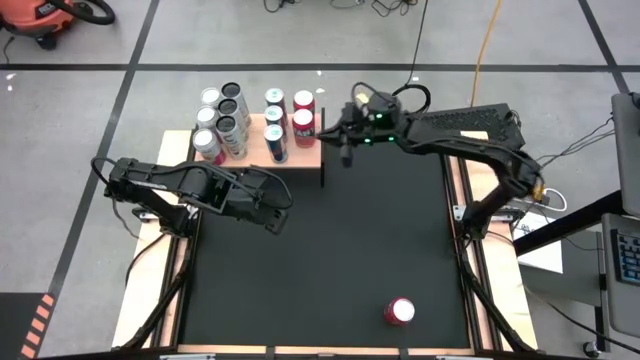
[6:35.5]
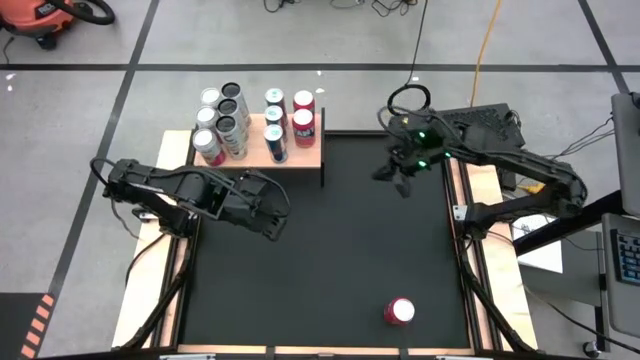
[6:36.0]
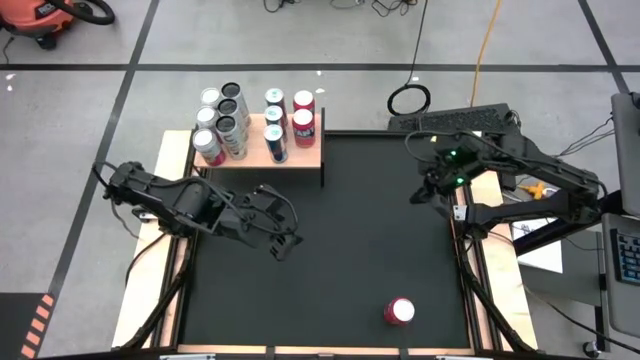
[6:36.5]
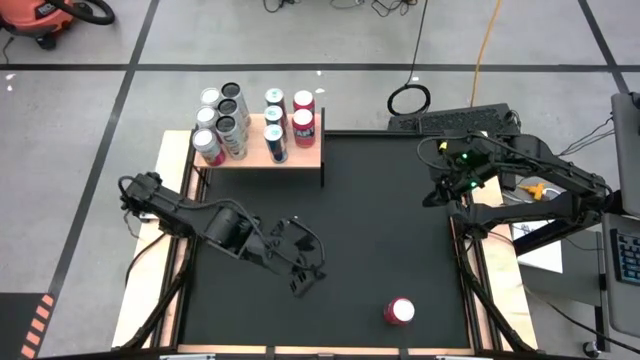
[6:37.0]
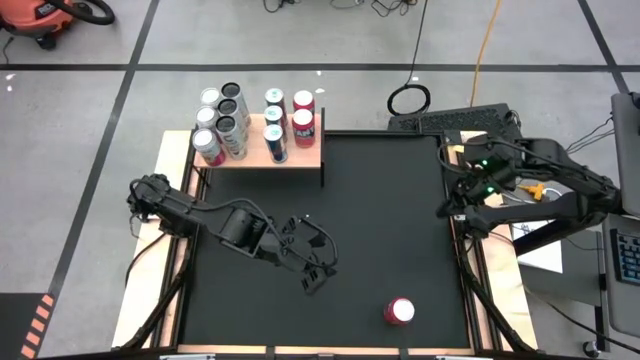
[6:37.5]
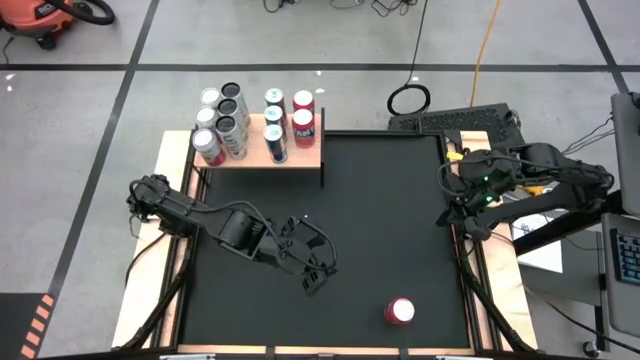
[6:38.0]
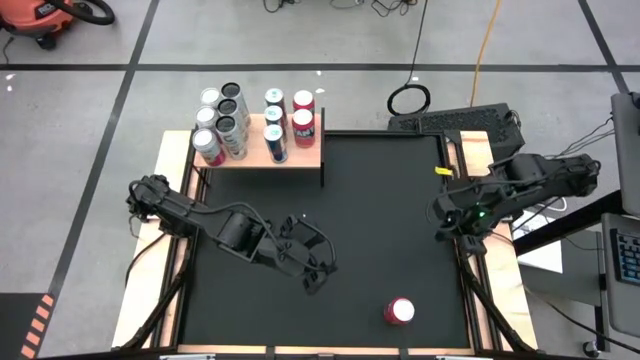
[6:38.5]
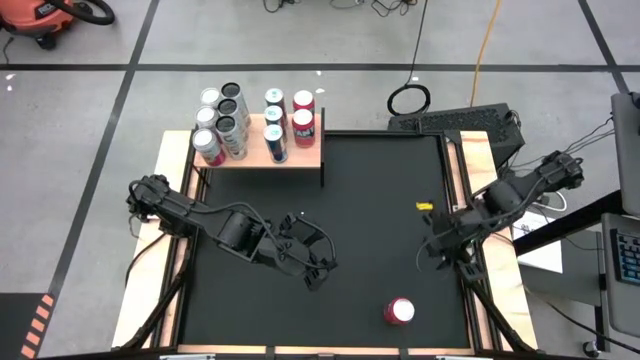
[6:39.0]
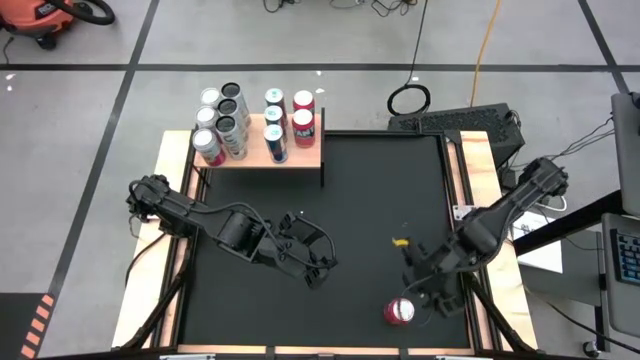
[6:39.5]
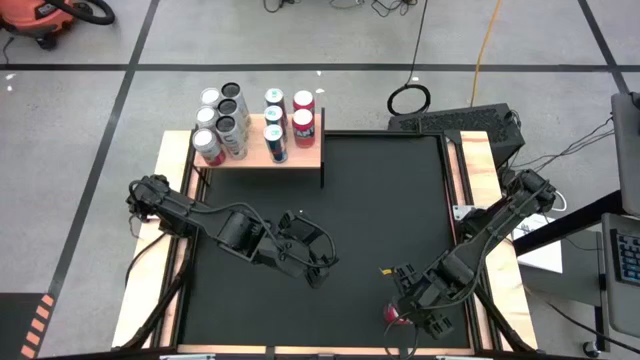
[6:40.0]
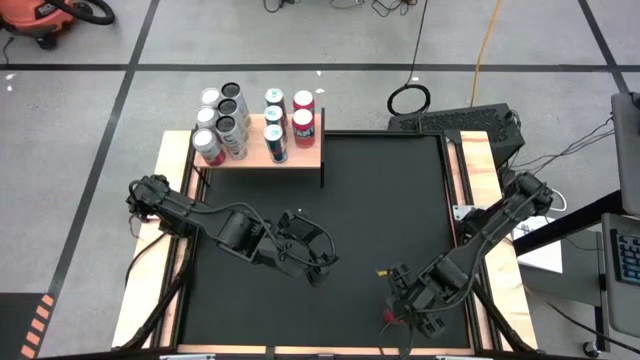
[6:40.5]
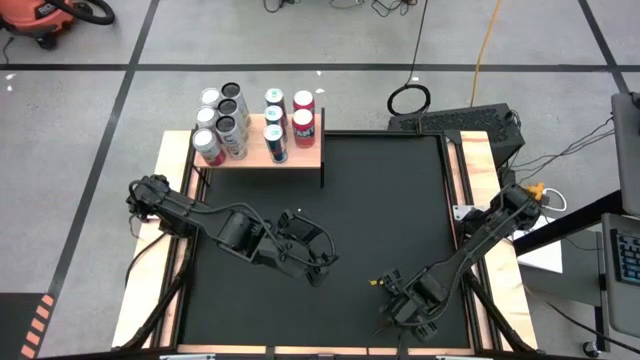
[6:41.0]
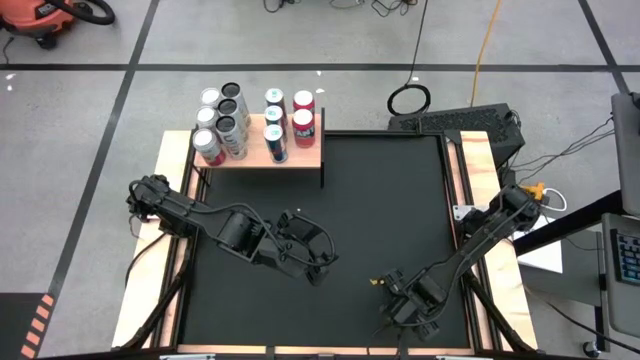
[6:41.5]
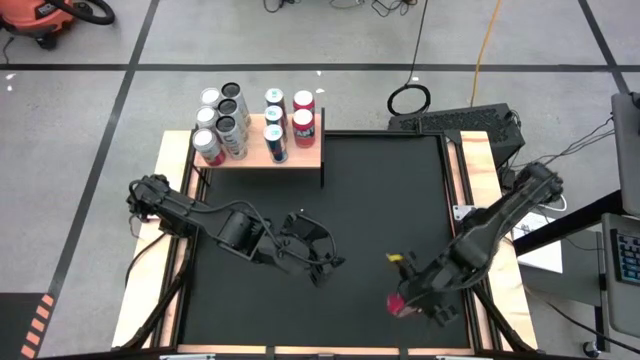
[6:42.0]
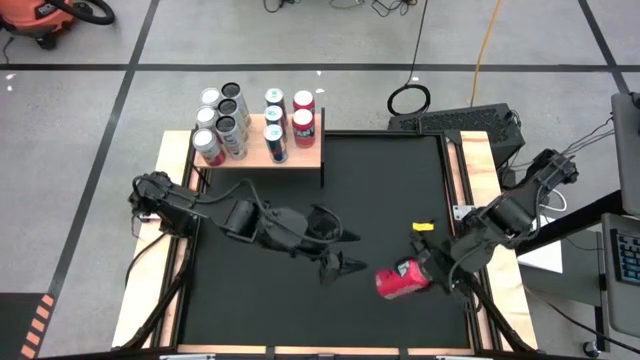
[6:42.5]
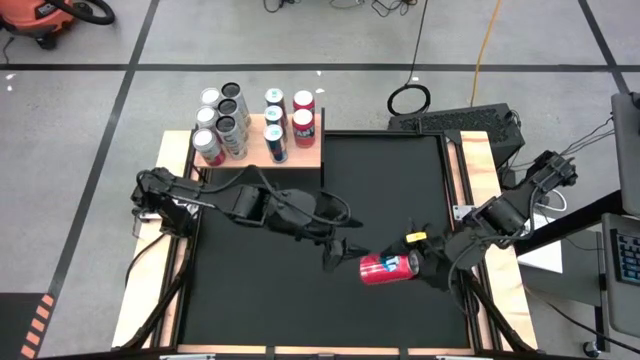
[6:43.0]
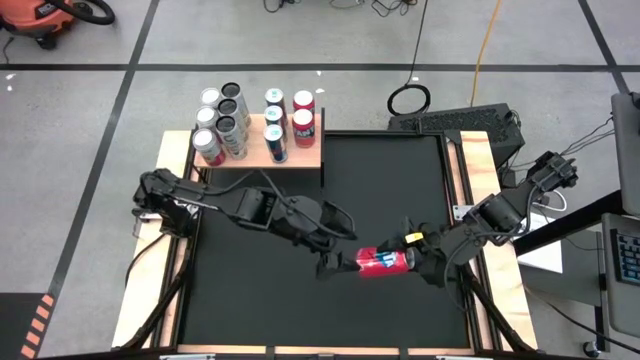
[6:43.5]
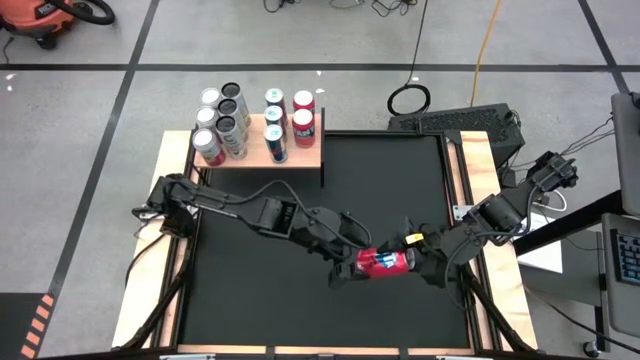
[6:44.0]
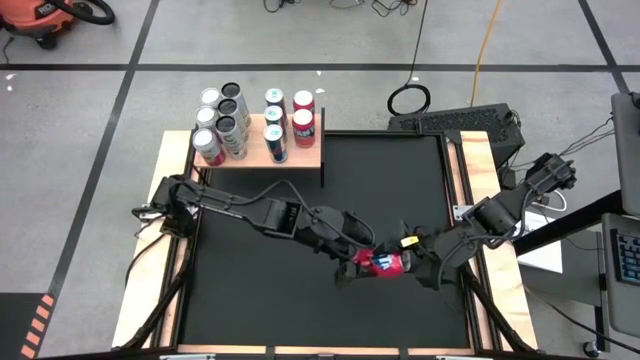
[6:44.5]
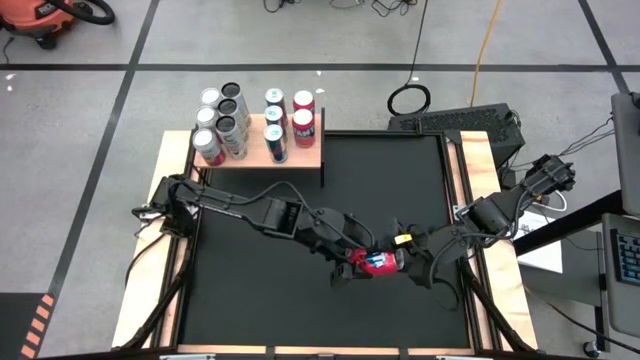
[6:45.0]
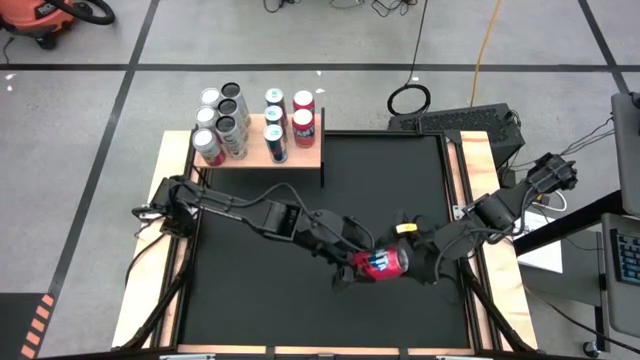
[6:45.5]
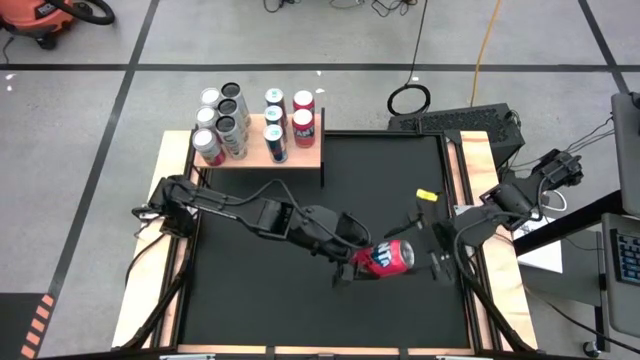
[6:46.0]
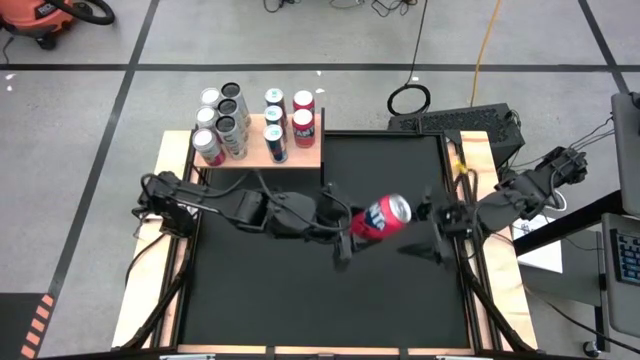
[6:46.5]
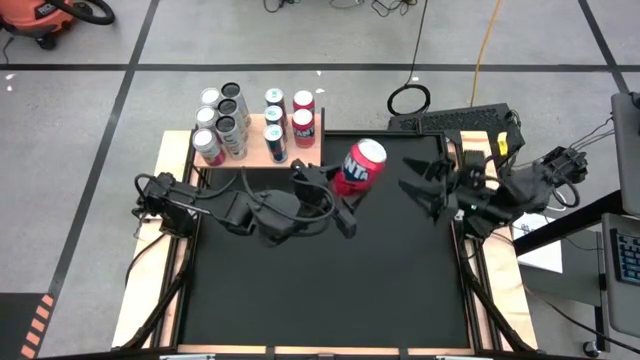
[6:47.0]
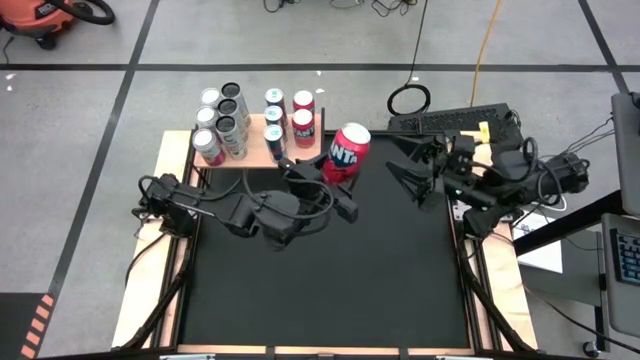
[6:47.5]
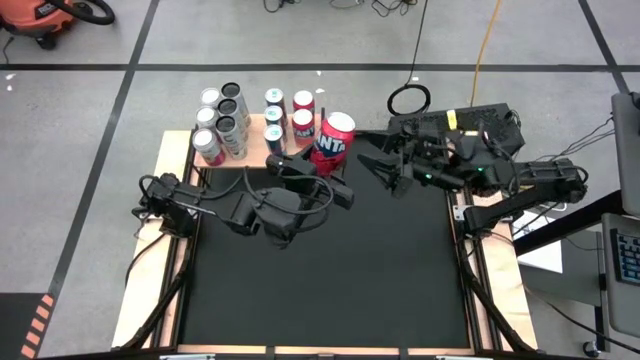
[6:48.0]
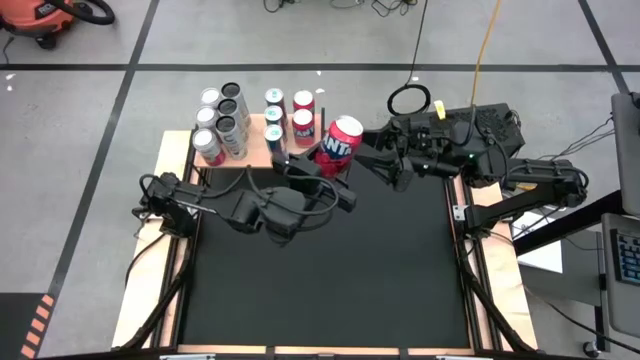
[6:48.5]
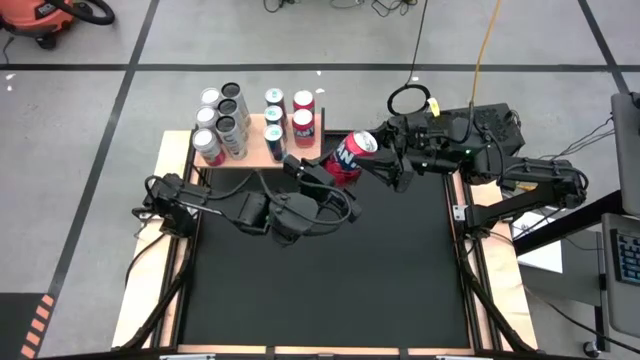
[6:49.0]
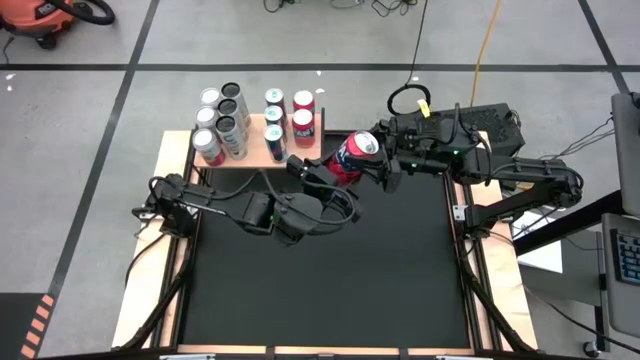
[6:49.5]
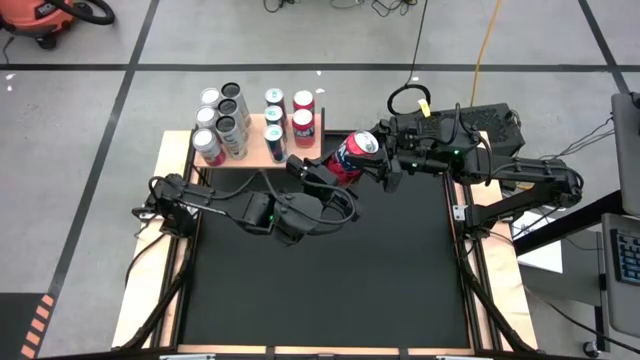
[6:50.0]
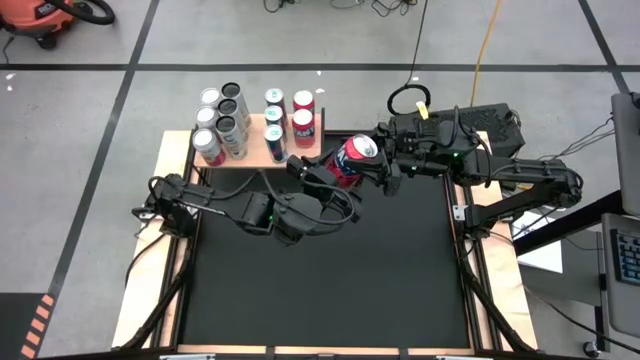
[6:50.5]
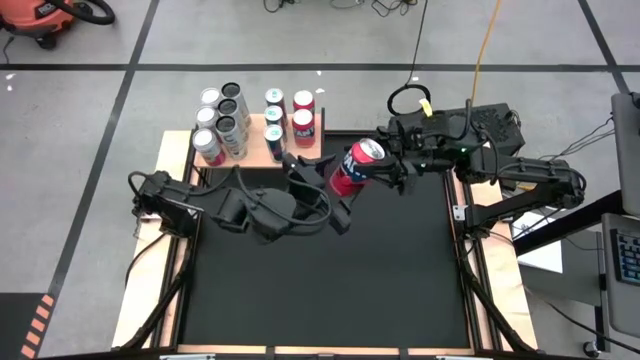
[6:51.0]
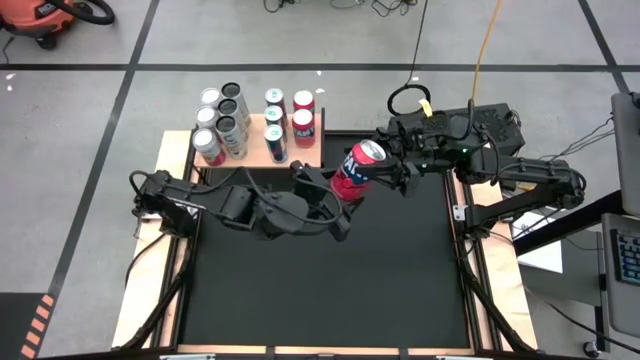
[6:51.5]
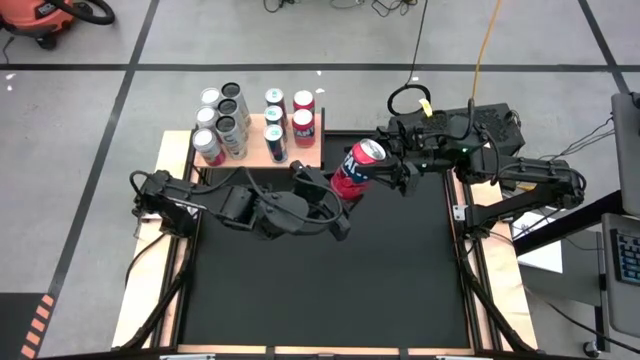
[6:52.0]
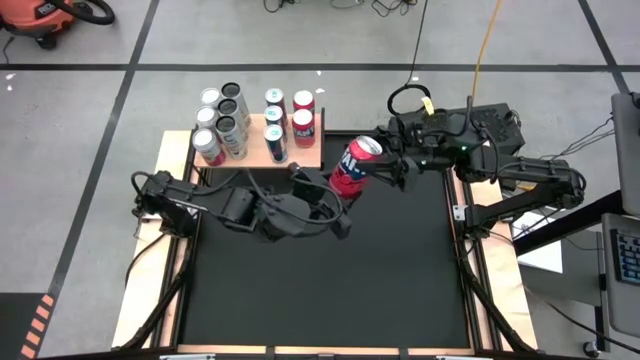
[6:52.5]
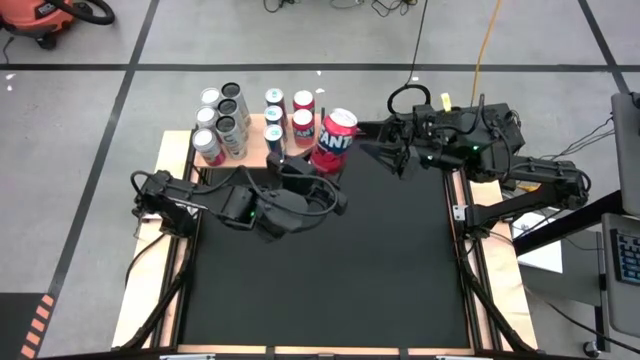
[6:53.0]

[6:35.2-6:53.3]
Task: Place canned beverage on shelf
Put the red soda can on the shelf aligned with the other red soda cans

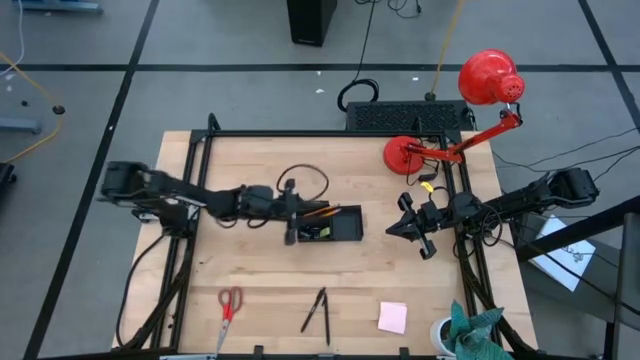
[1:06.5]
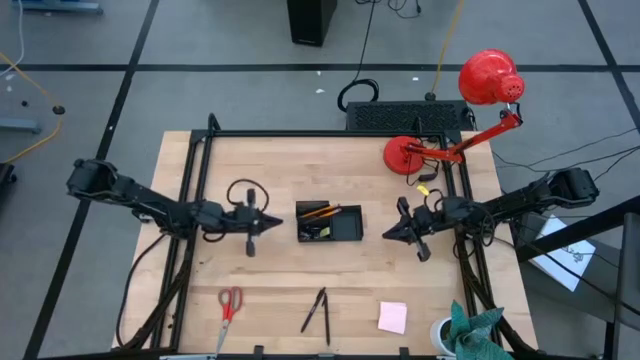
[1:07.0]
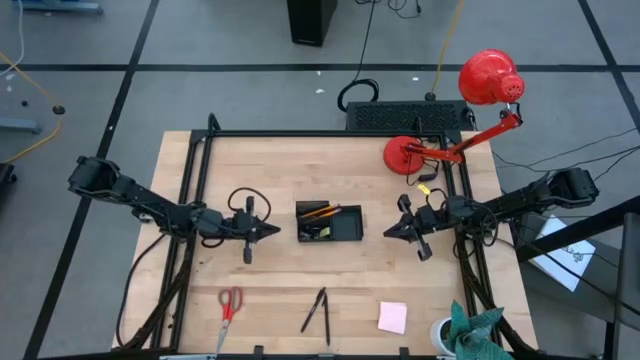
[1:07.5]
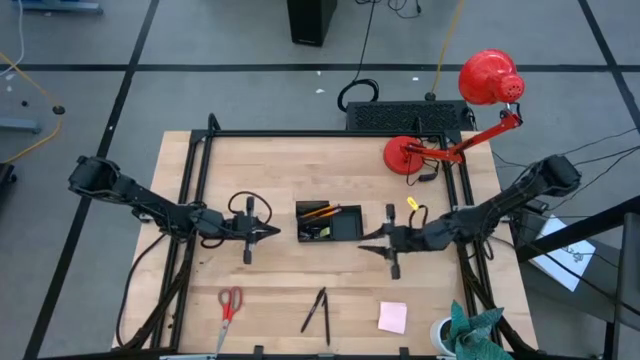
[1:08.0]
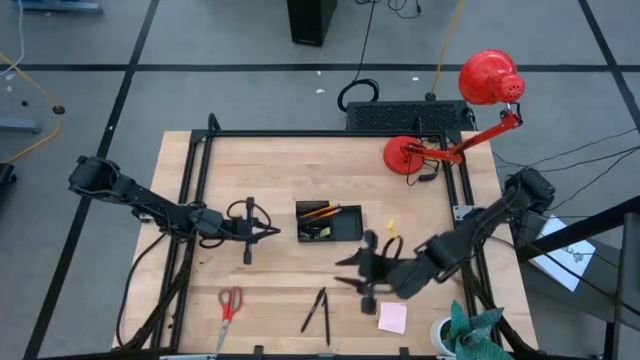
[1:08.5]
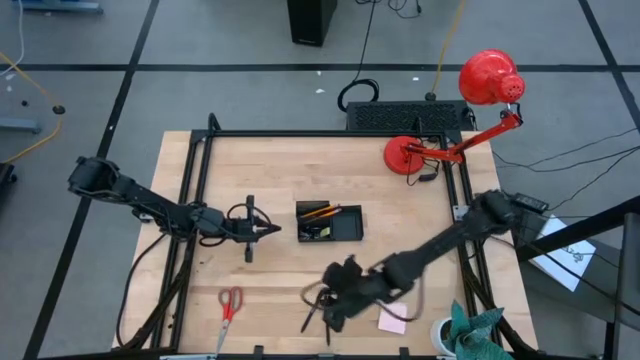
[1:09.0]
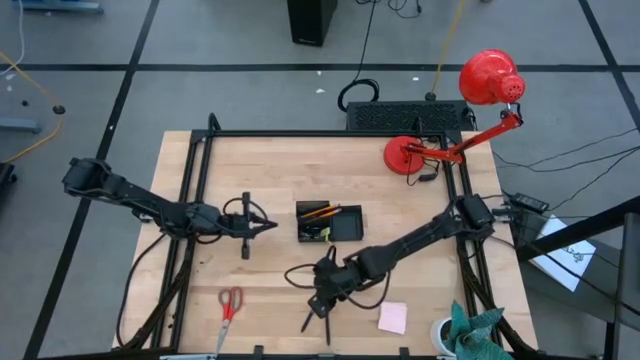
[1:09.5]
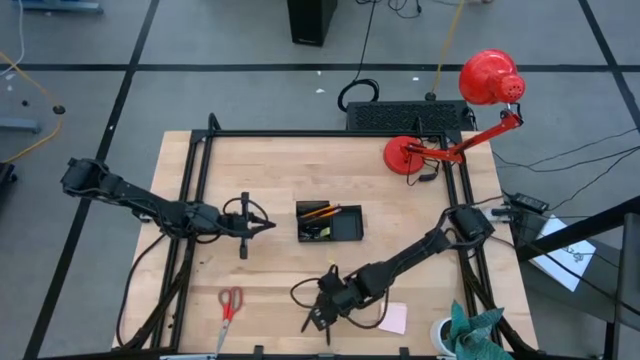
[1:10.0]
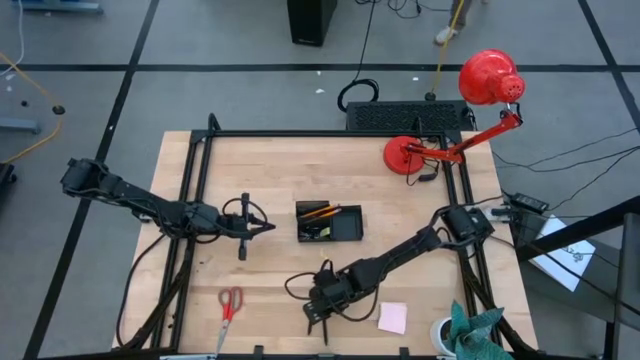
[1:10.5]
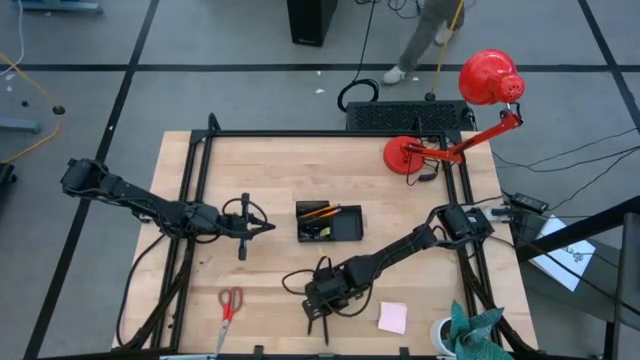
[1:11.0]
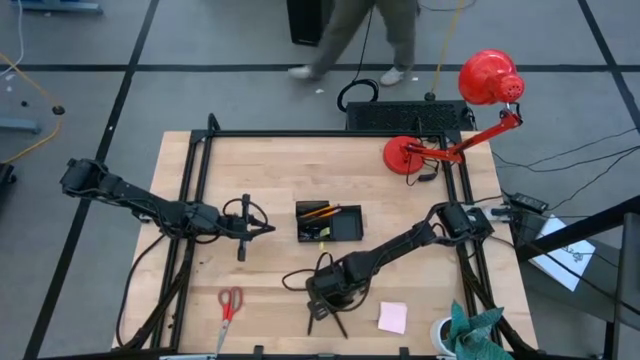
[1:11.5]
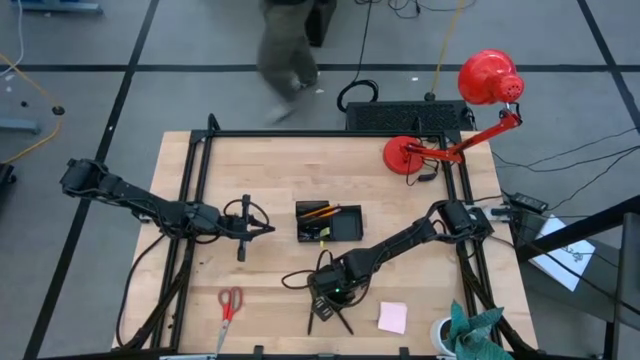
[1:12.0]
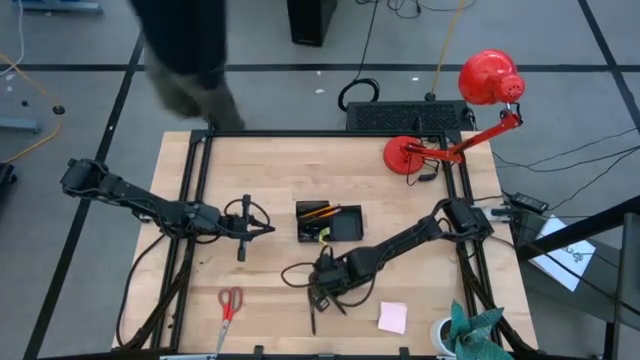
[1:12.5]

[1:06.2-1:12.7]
Task: Pick and place office supplies into organizer
Put the black pen into the desk organizer
